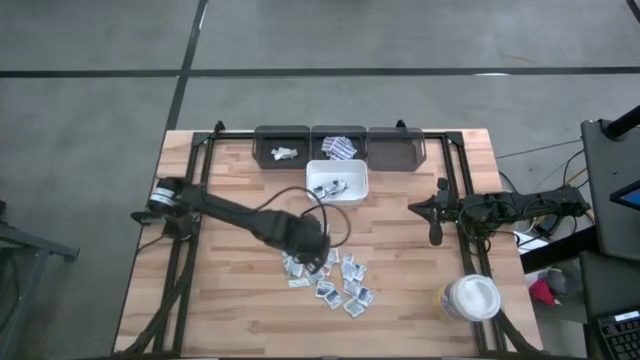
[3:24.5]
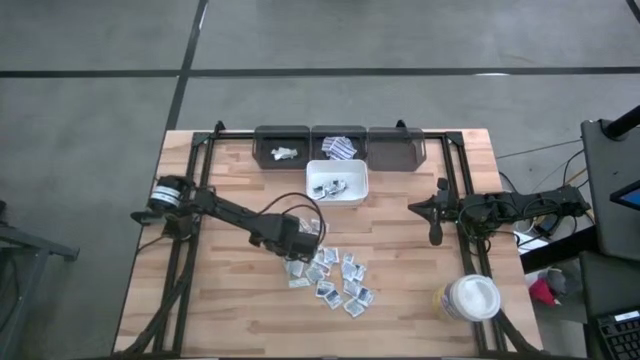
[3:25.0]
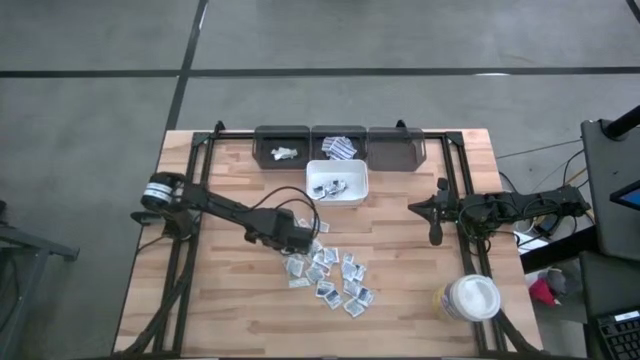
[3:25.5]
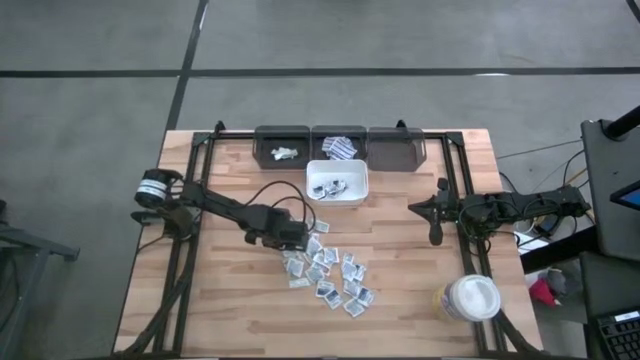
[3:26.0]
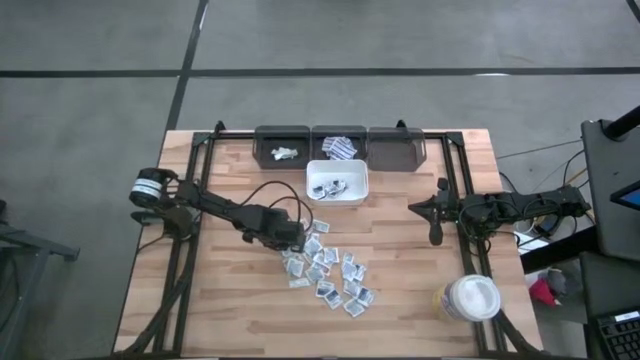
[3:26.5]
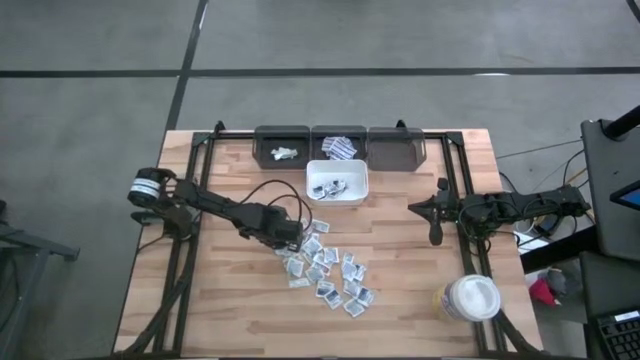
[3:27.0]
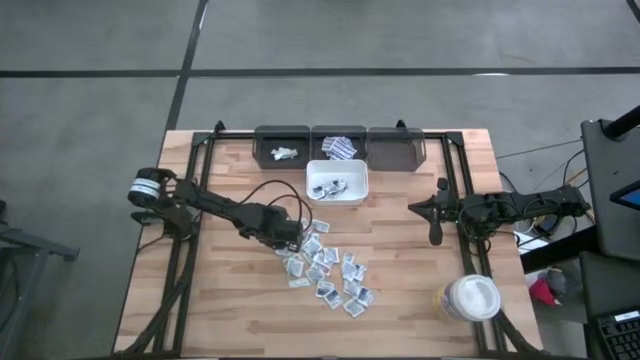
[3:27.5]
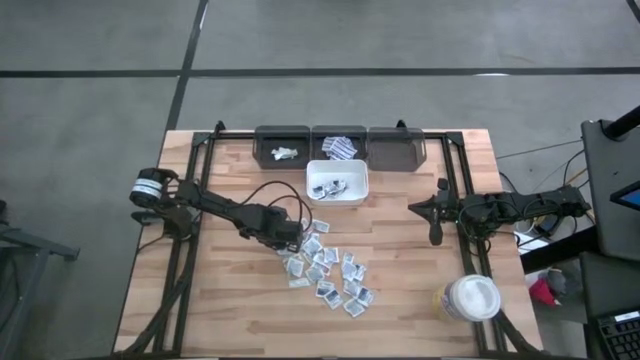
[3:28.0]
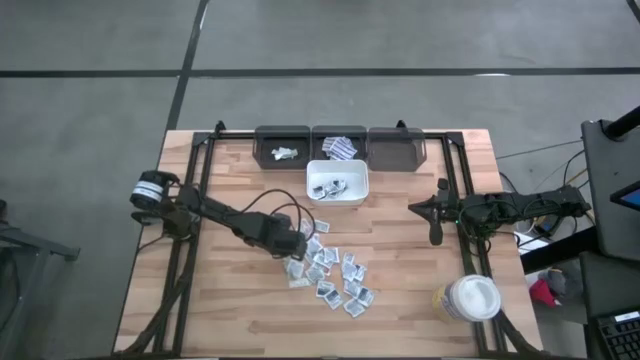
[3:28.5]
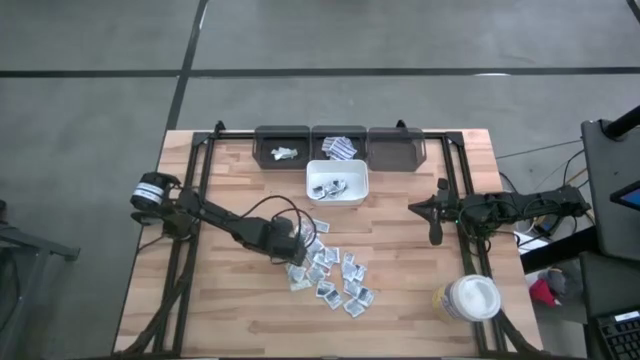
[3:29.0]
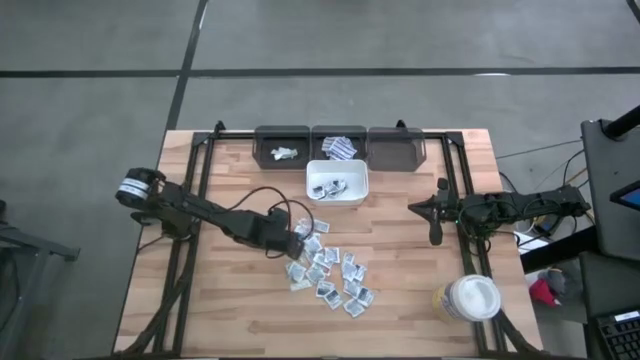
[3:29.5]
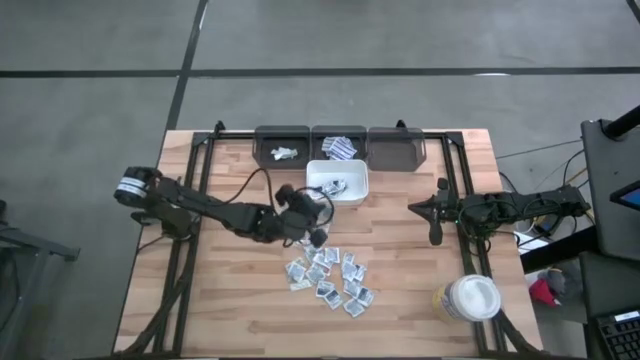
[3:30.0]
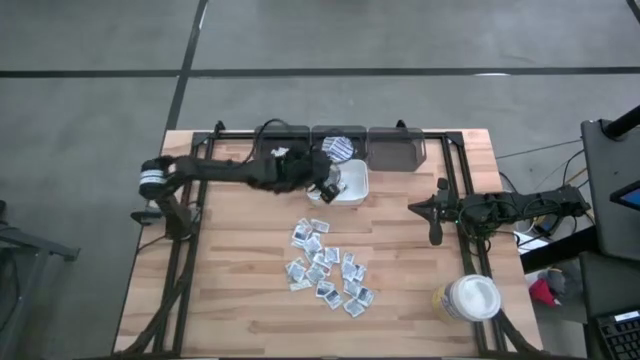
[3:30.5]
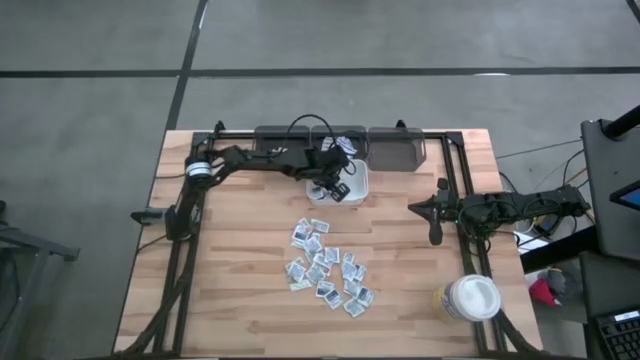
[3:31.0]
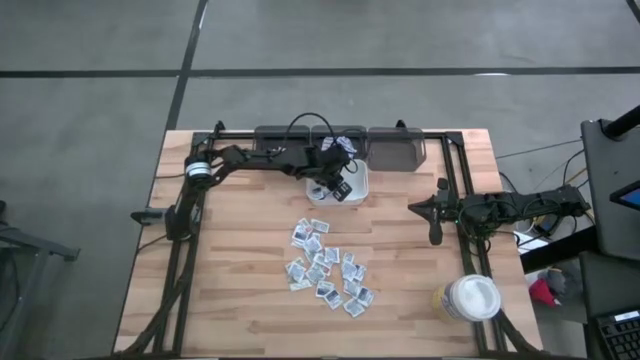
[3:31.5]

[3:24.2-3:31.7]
Task: Pick & Place First Aid Supplies
Put the blue alcohol pad into the white bin

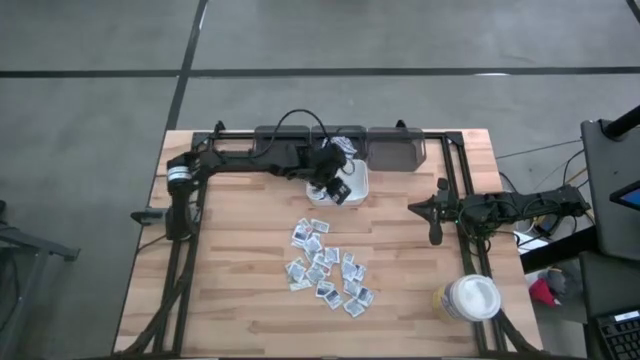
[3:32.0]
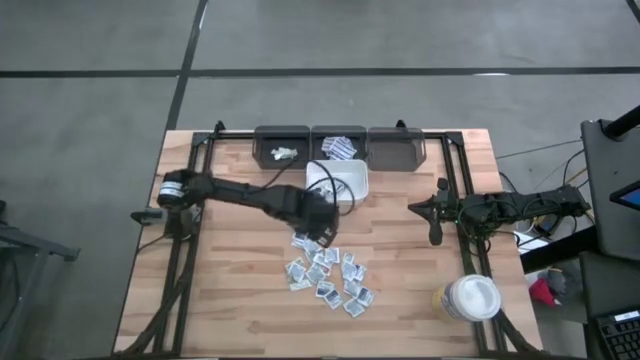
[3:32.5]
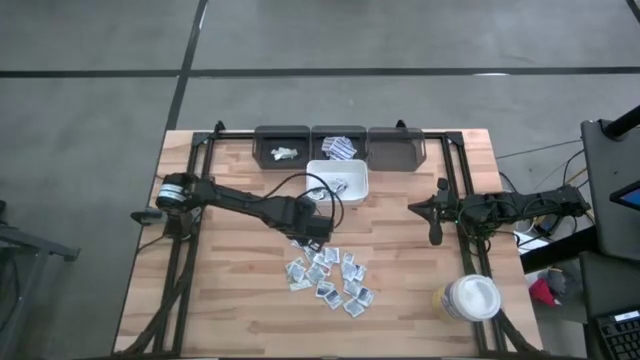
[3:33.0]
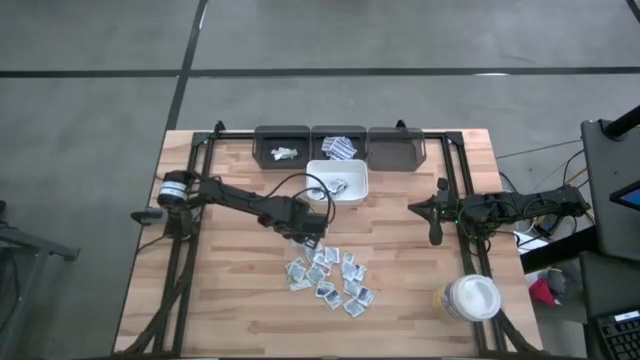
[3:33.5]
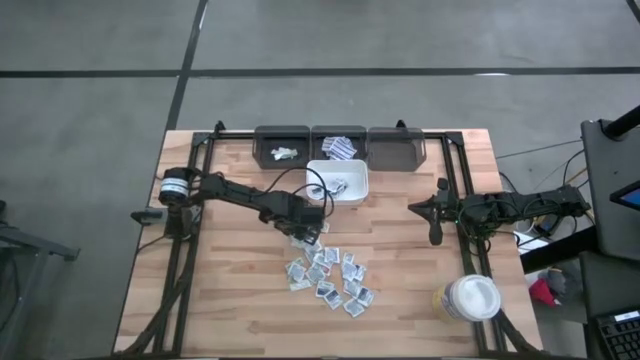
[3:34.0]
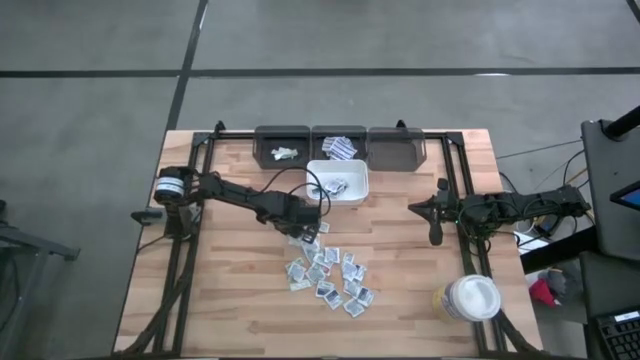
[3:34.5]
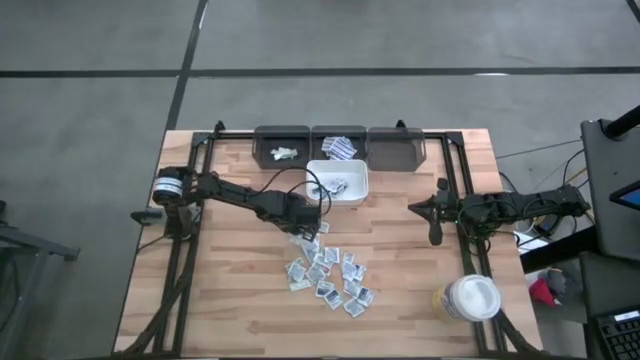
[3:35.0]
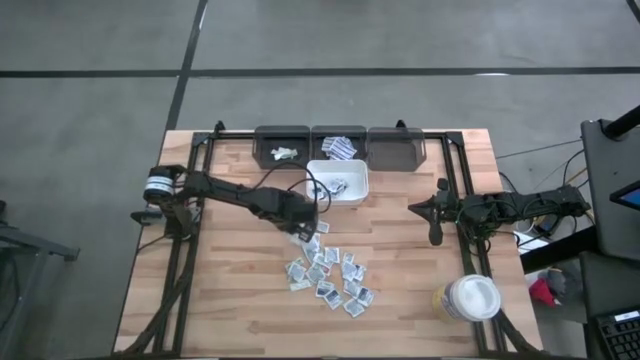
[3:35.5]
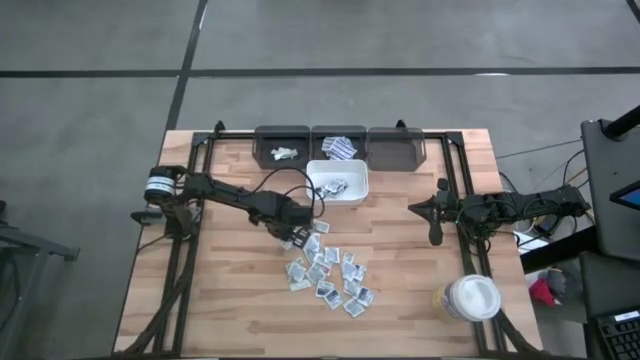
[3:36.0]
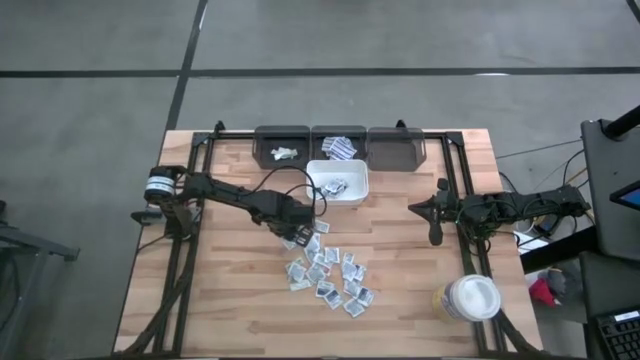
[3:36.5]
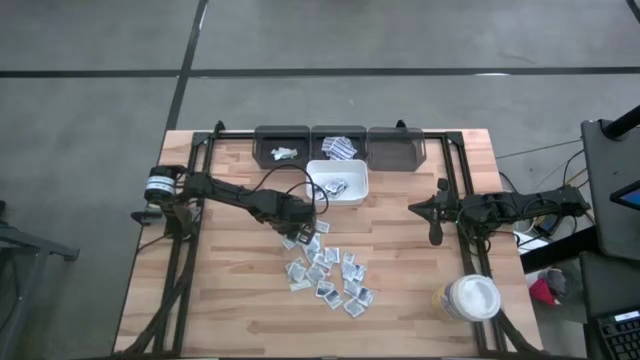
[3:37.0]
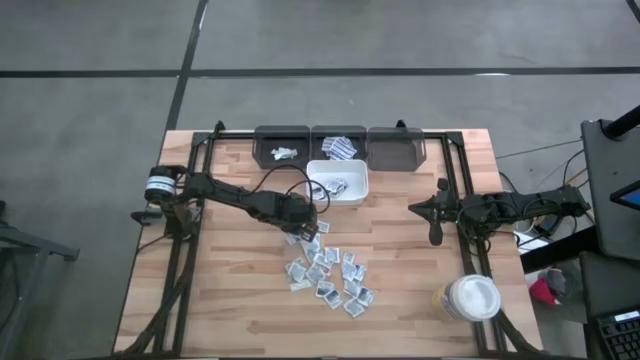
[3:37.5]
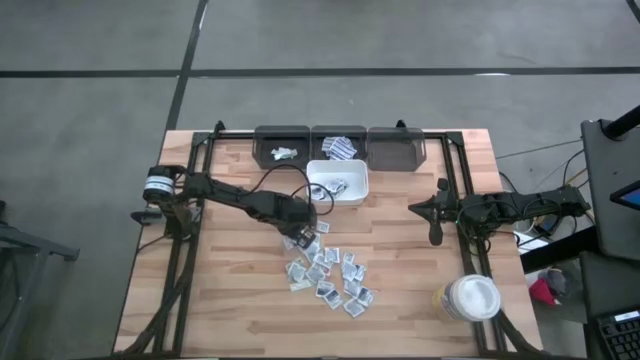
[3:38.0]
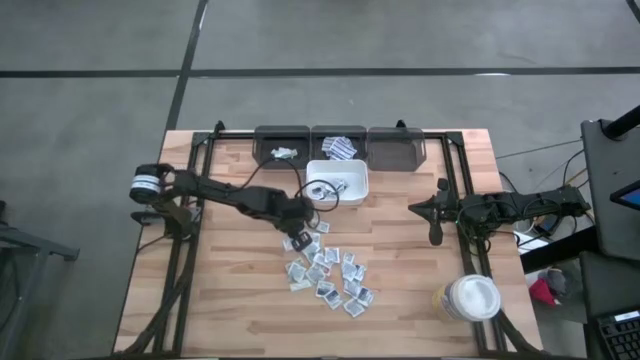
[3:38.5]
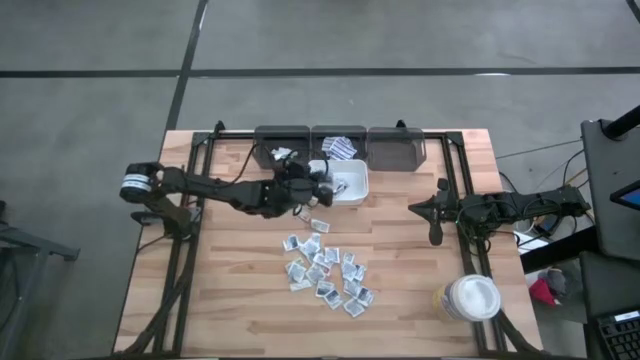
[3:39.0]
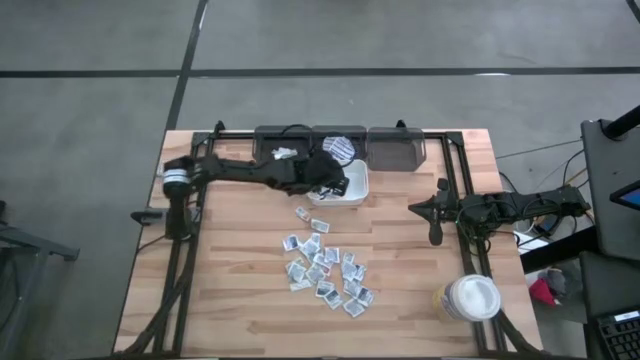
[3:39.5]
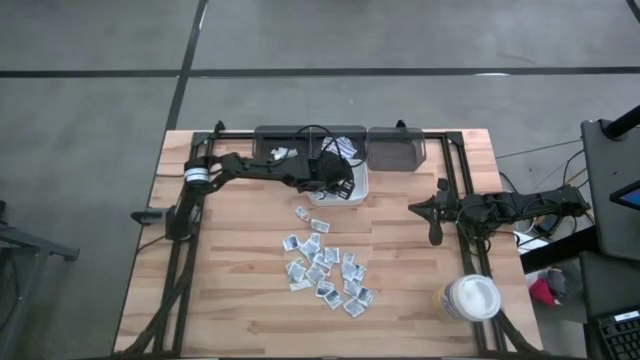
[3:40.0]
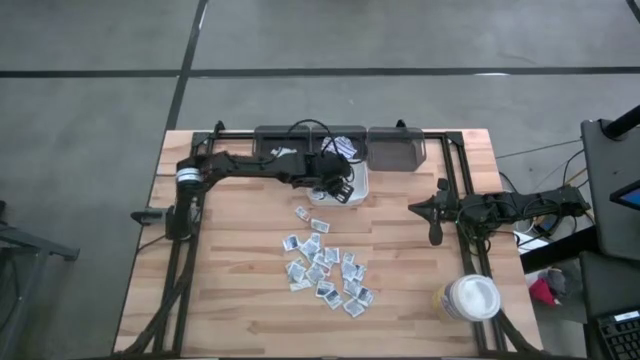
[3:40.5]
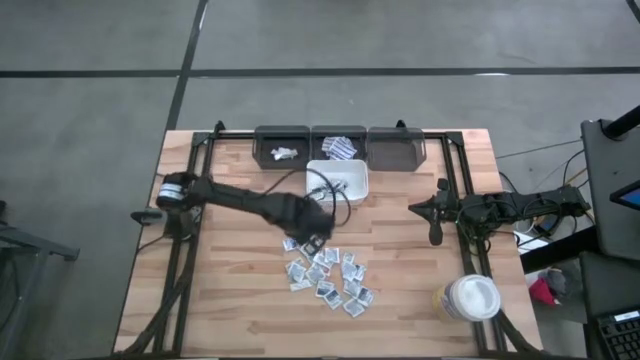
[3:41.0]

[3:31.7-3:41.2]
Put the blue alcohol pad into the white bin

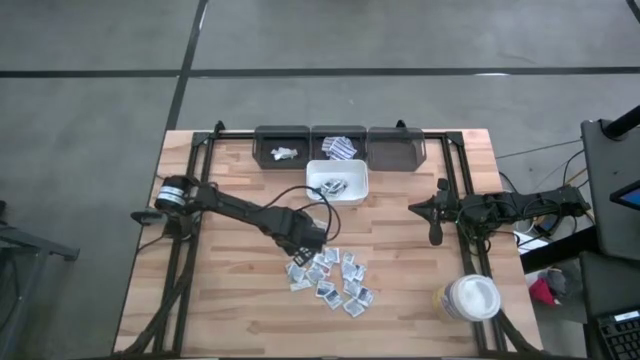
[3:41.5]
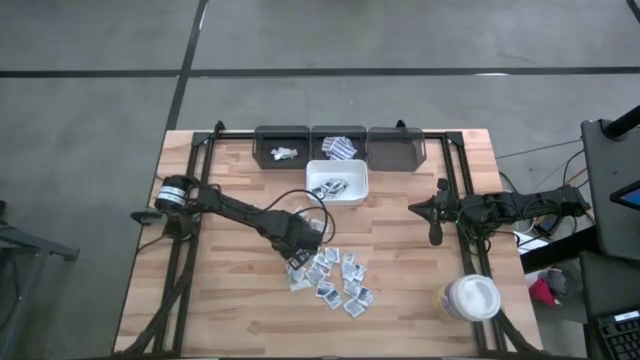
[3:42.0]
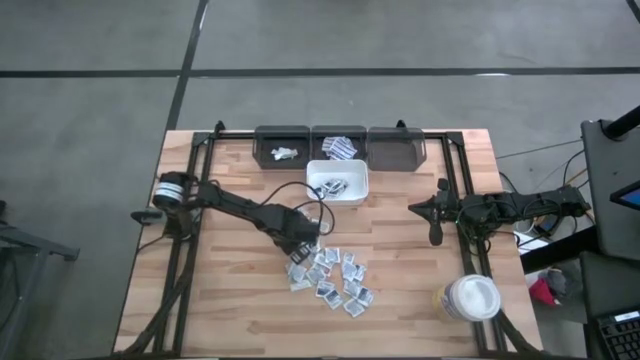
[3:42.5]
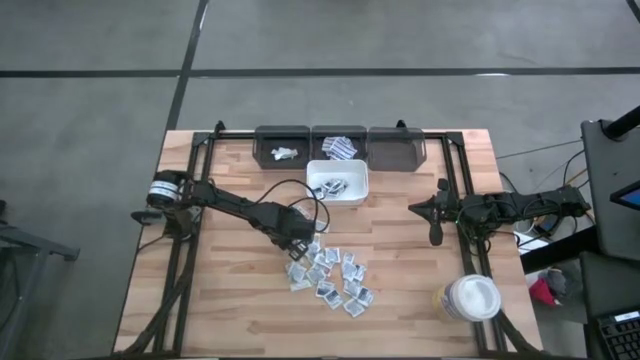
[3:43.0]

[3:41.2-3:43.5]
Put the blue alcohol pad into the white bin

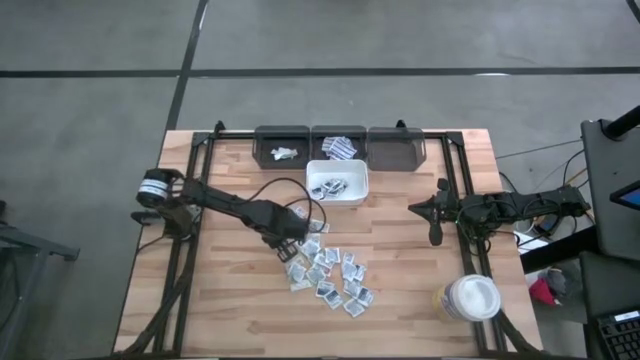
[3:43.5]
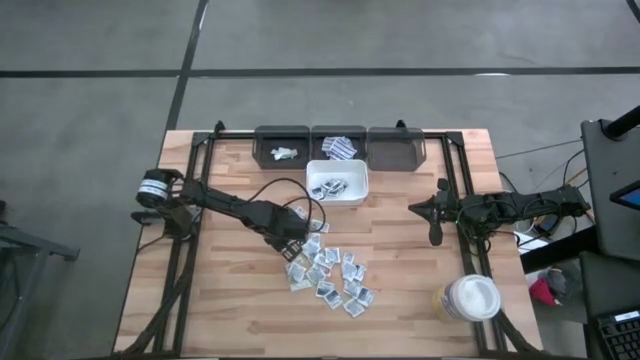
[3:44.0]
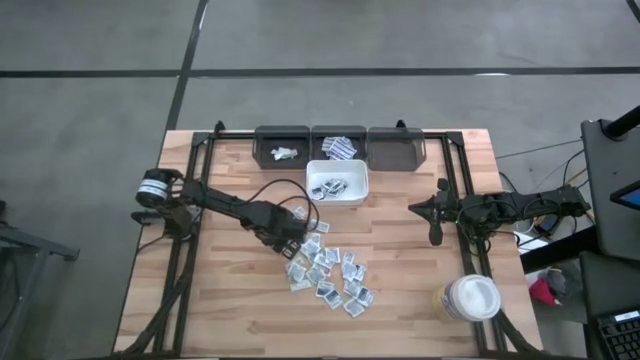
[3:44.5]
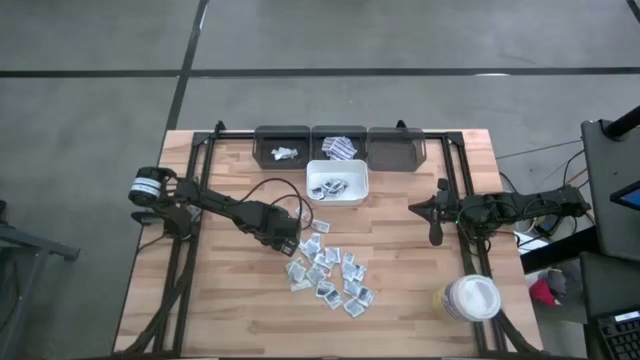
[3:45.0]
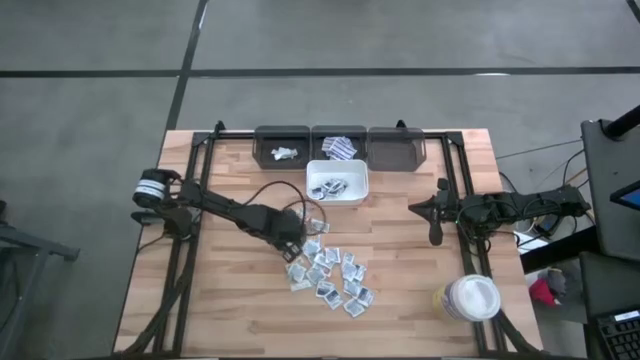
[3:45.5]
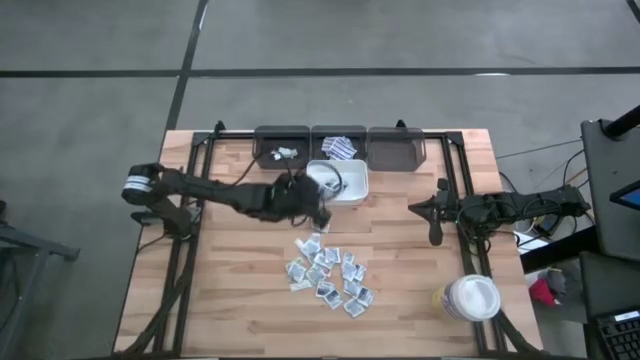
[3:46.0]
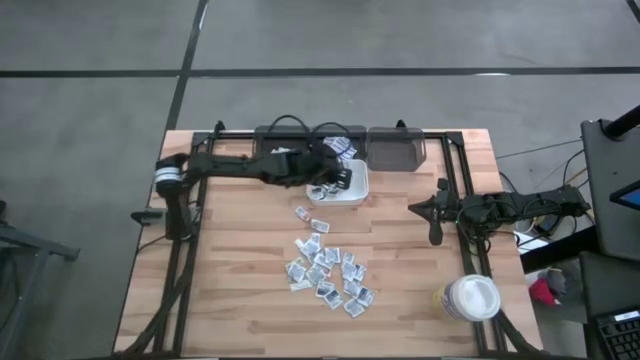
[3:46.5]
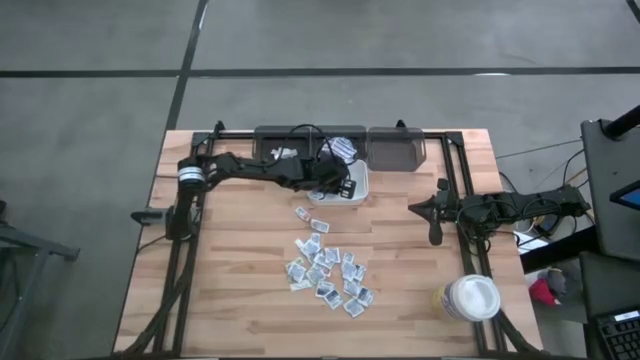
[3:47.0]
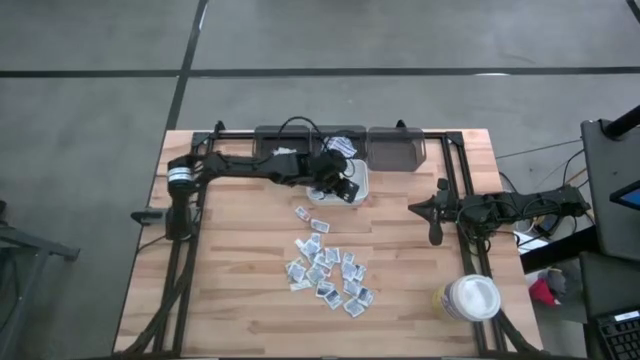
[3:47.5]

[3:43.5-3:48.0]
Put the blue alcohol pad into the white bin
